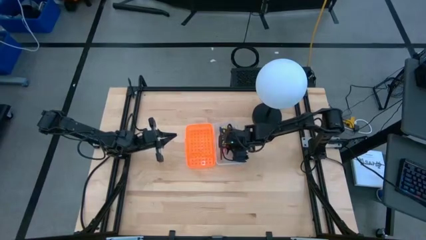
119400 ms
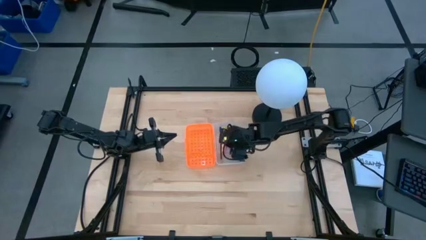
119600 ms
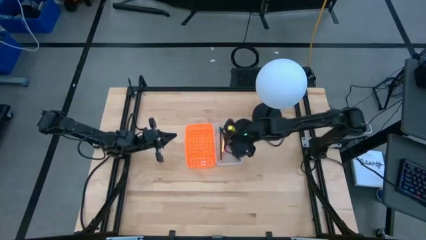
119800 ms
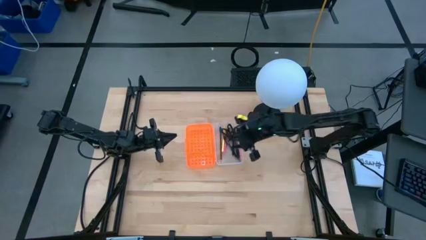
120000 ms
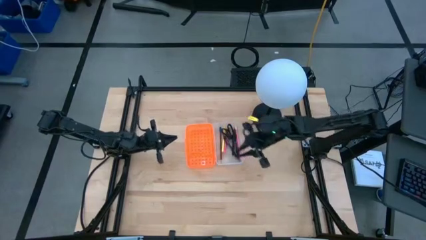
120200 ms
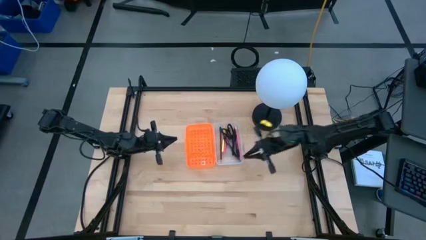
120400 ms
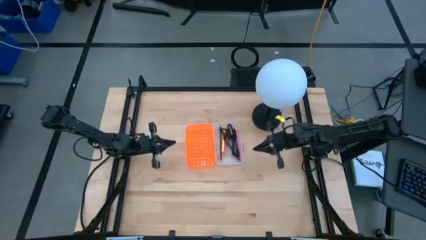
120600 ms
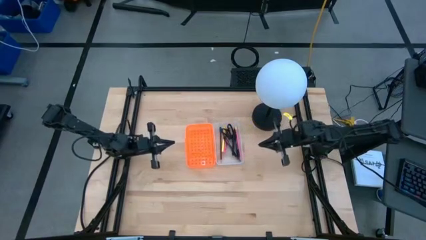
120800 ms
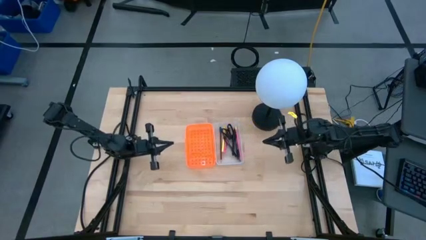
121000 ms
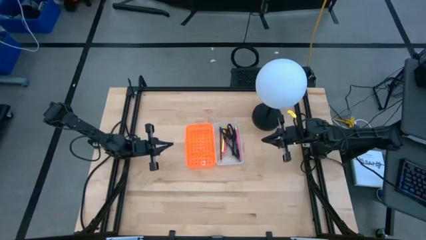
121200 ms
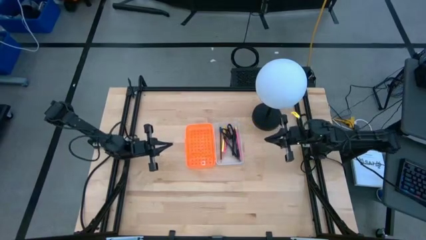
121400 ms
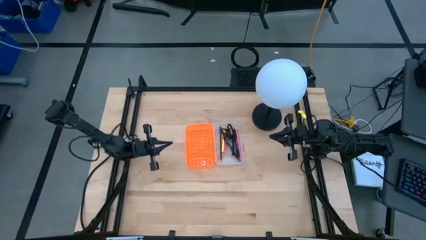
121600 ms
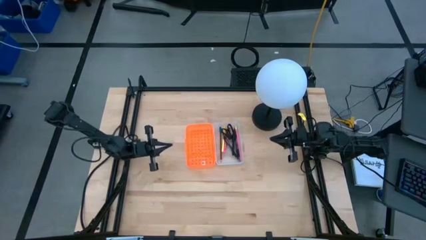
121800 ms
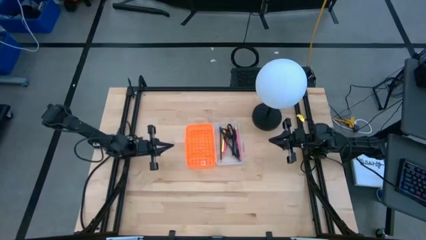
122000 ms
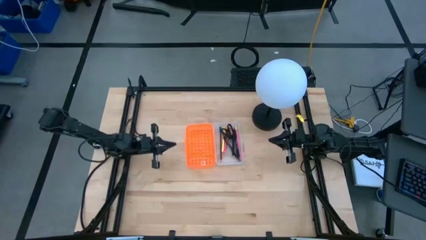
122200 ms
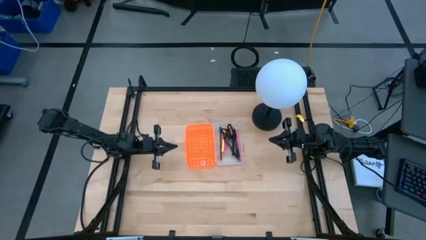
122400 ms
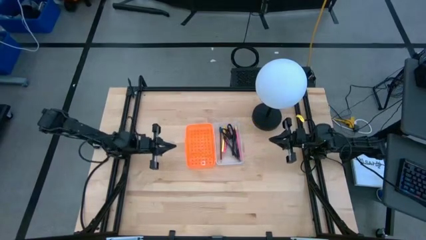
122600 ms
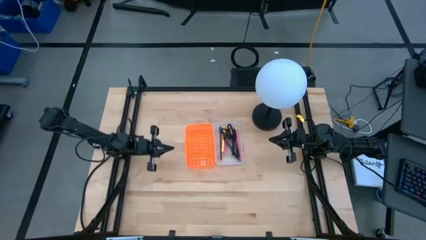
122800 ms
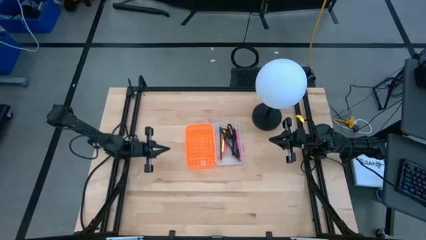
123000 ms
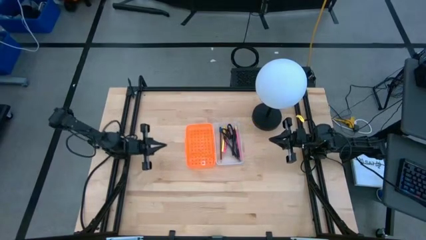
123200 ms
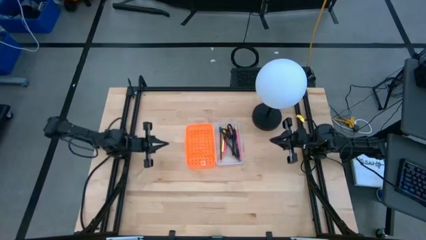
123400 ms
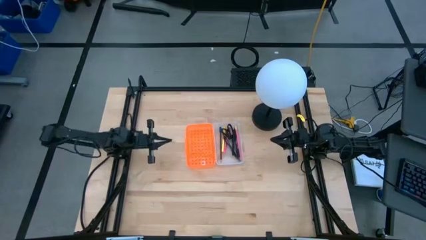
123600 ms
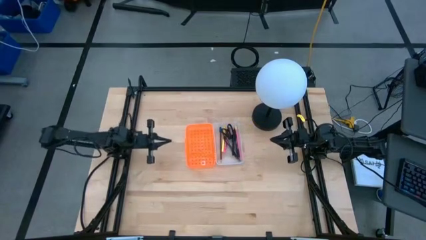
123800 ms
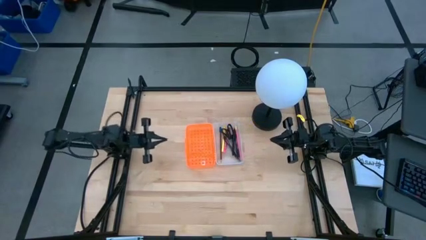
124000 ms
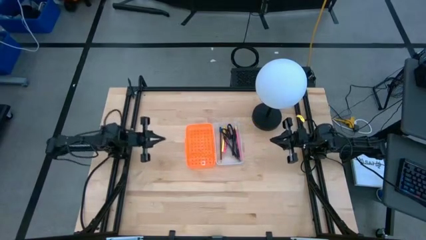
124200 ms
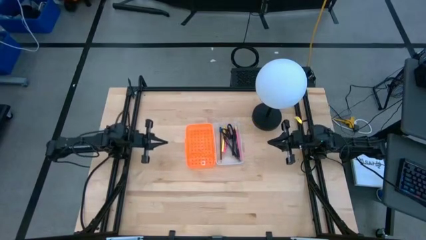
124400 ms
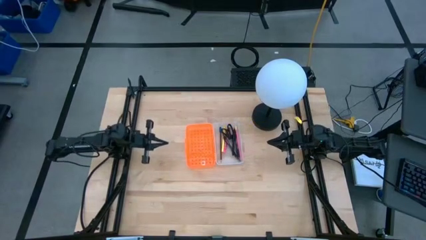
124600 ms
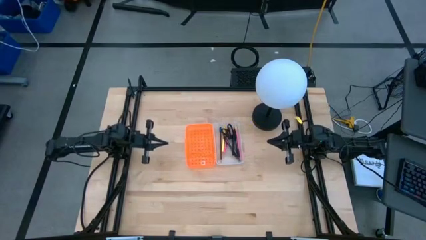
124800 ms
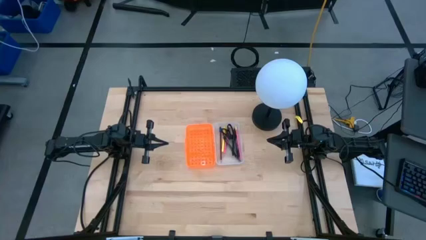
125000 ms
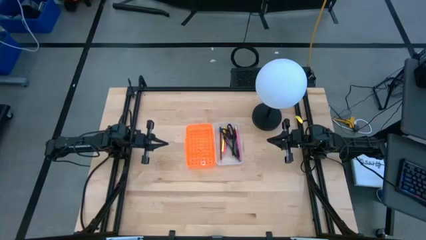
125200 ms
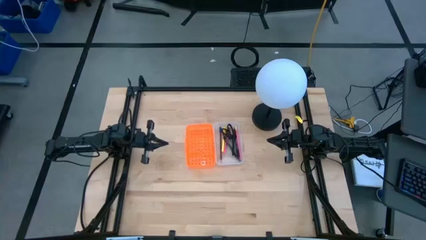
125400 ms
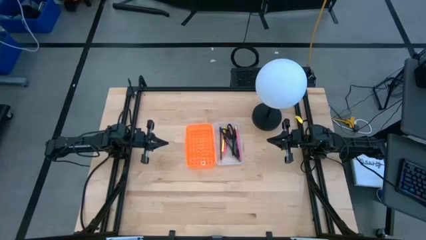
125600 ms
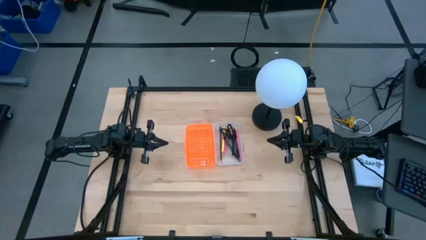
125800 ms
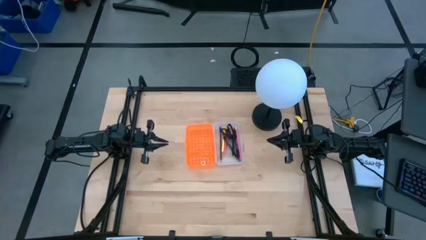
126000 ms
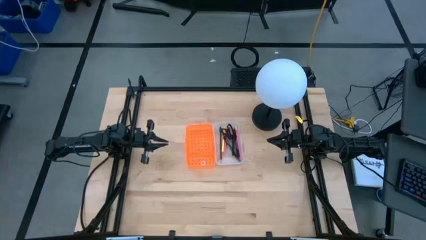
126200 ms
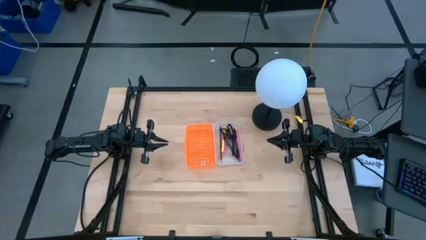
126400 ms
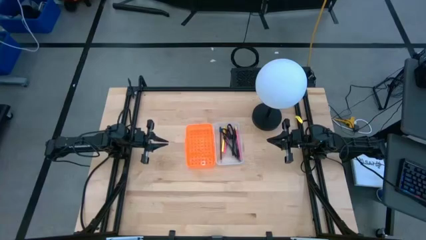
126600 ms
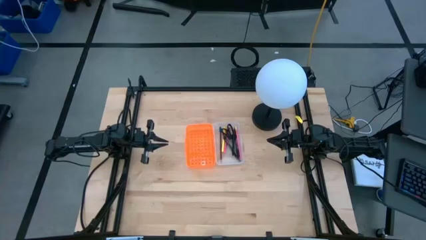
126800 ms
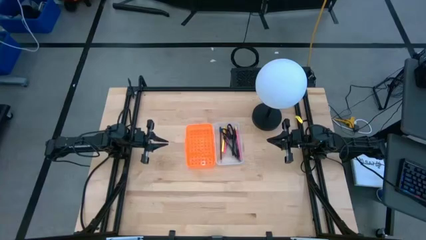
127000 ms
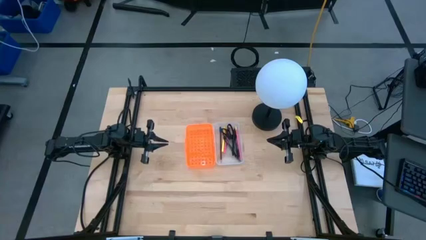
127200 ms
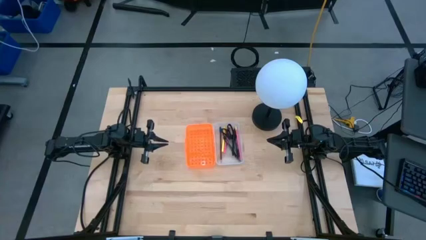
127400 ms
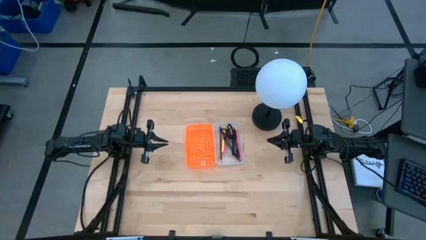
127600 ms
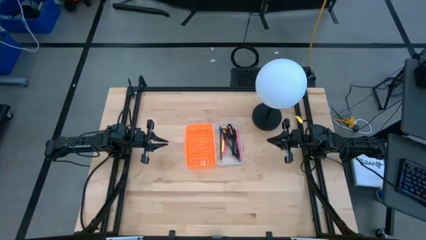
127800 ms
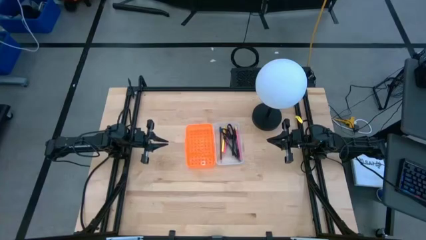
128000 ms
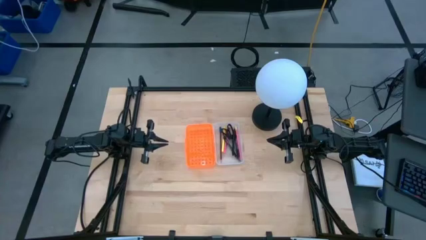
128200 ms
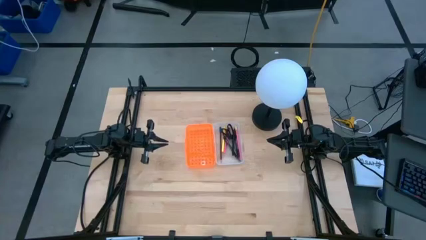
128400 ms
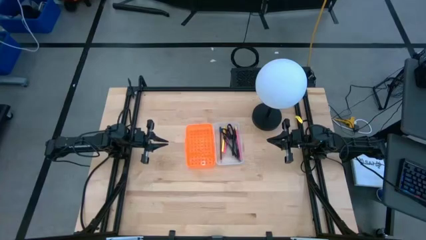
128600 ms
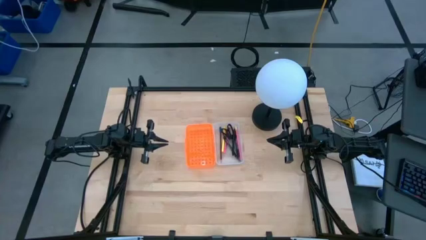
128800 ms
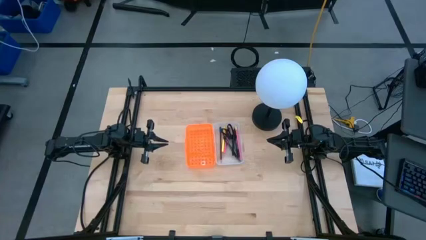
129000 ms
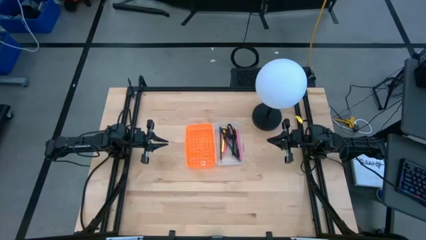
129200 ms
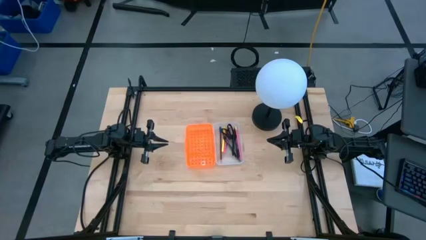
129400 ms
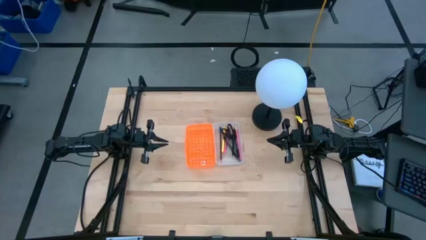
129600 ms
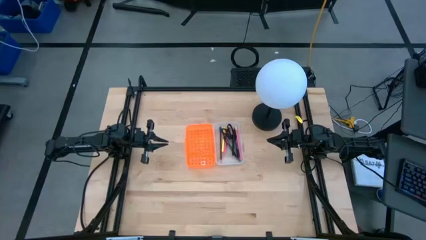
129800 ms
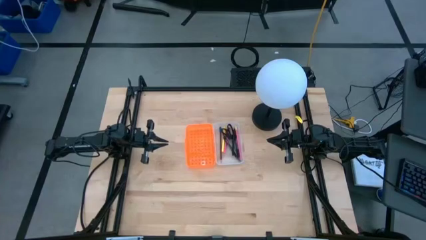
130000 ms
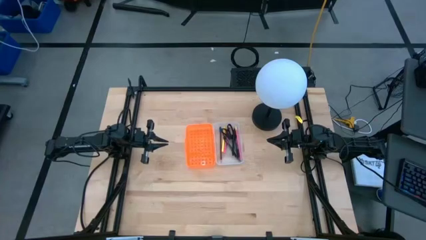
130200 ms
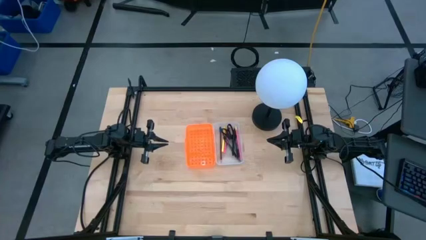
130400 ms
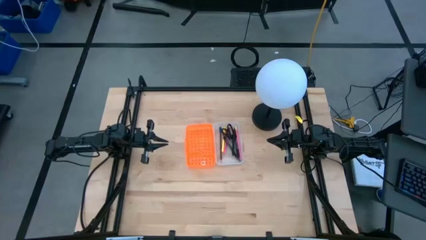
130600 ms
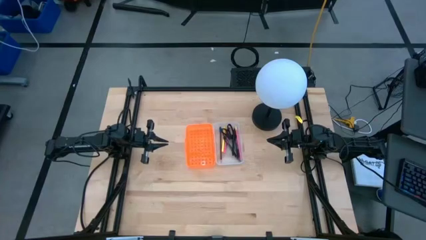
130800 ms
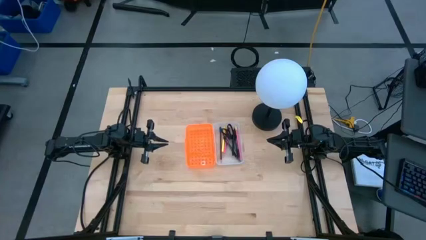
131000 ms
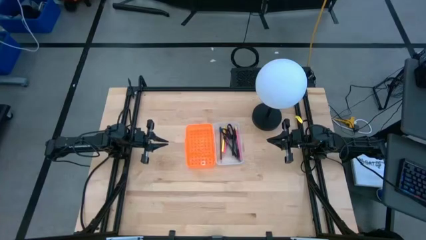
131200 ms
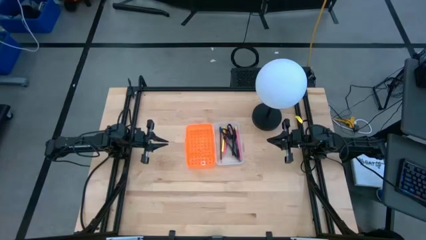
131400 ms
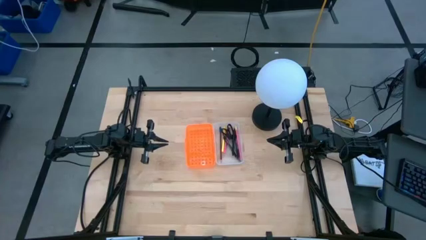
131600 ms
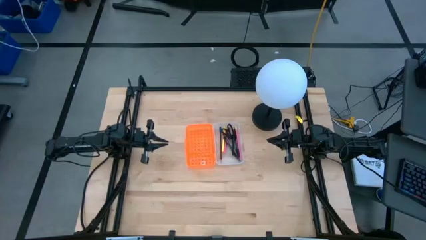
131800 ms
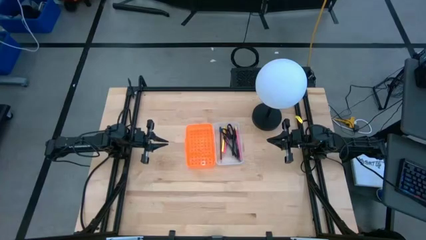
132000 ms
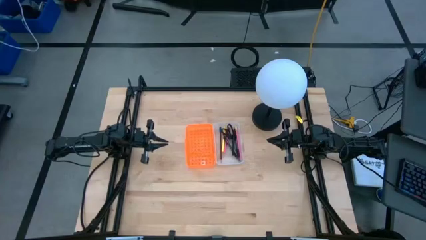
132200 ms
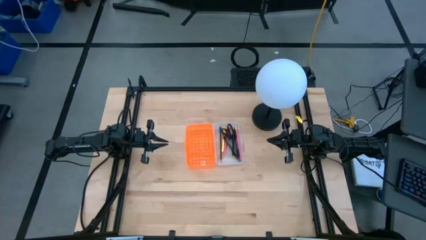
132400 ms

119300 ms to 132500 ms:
Task: Pick & place school supplies into a supply box
Return to Home Position

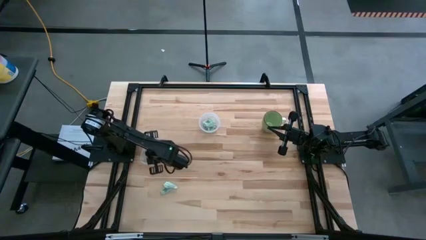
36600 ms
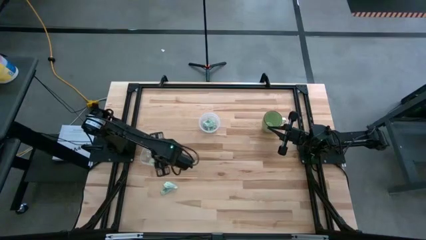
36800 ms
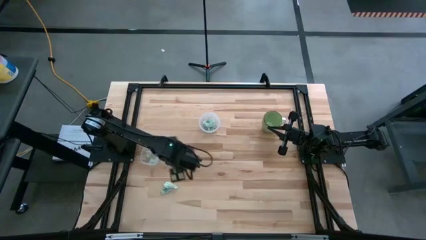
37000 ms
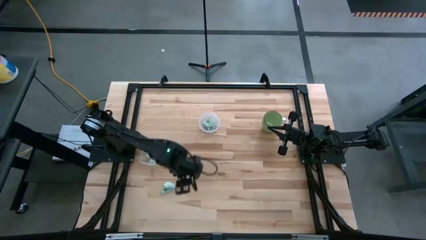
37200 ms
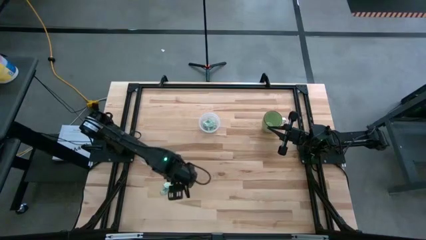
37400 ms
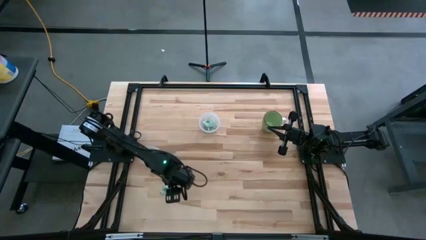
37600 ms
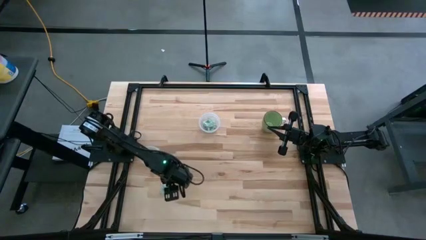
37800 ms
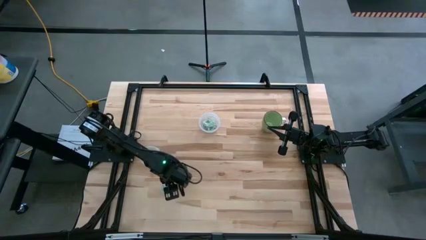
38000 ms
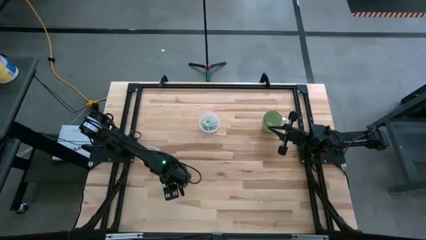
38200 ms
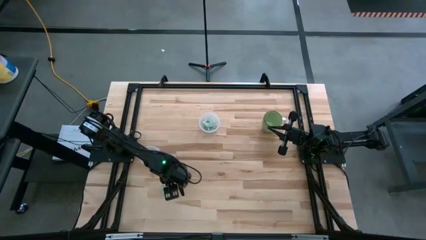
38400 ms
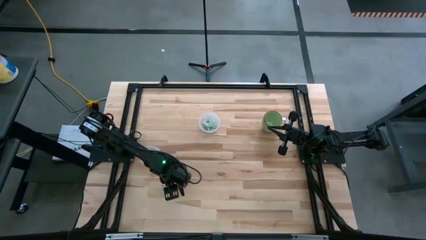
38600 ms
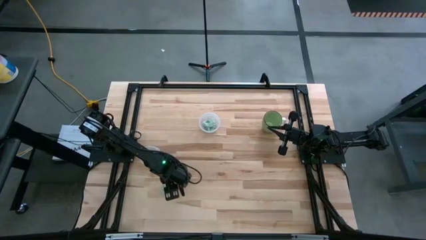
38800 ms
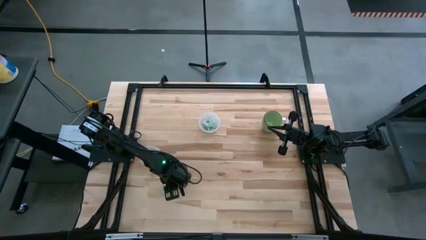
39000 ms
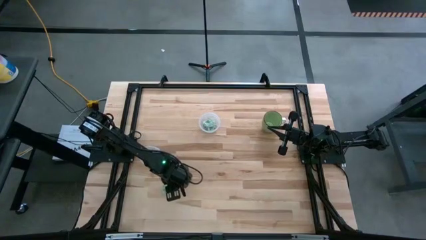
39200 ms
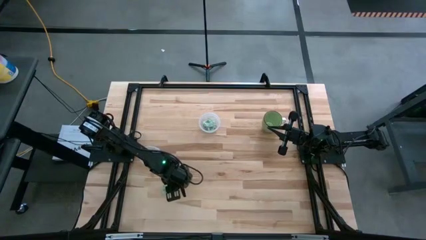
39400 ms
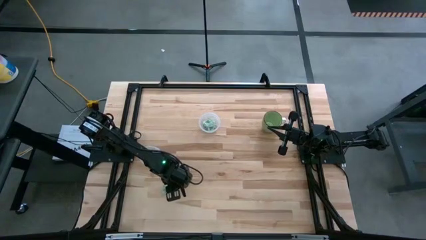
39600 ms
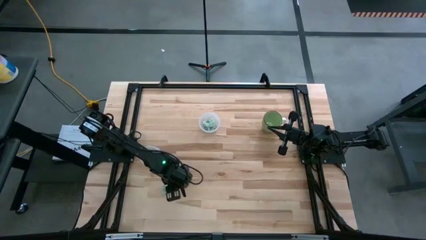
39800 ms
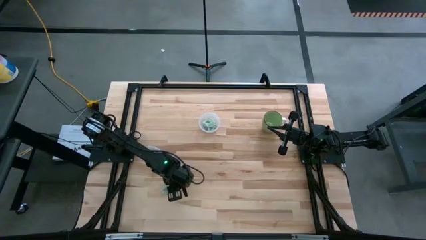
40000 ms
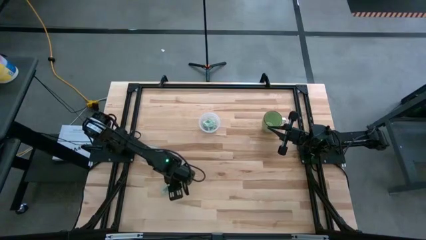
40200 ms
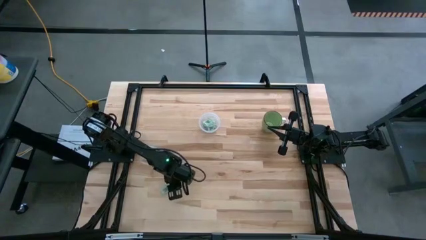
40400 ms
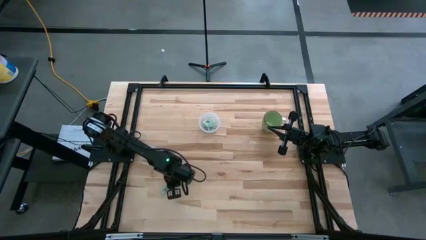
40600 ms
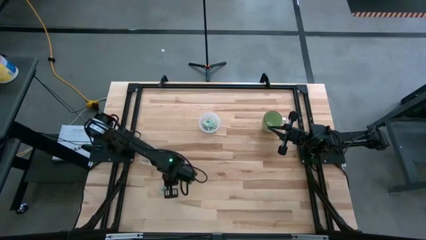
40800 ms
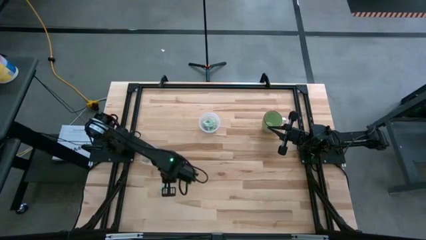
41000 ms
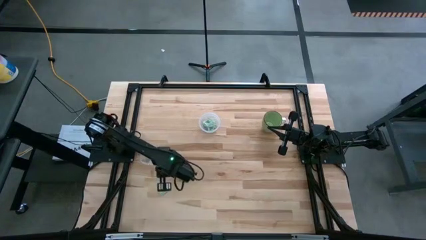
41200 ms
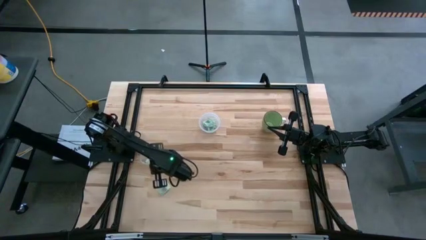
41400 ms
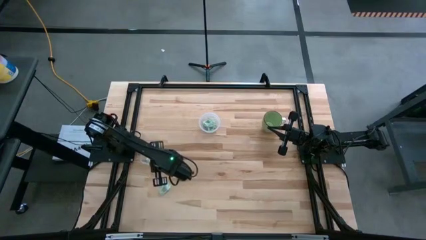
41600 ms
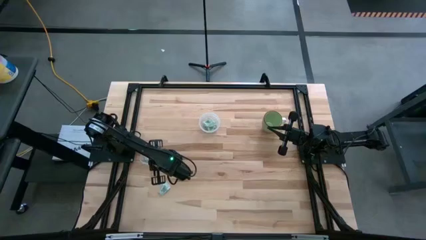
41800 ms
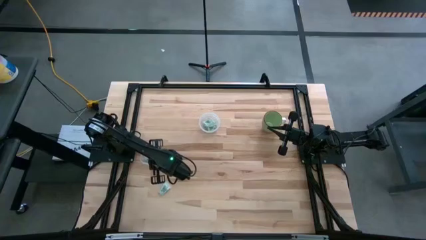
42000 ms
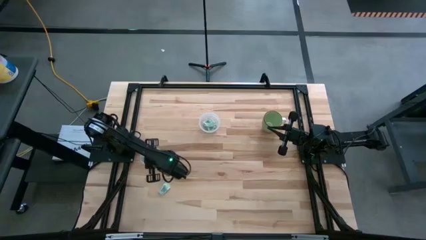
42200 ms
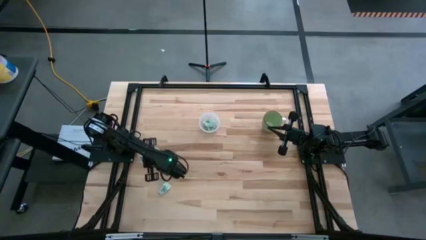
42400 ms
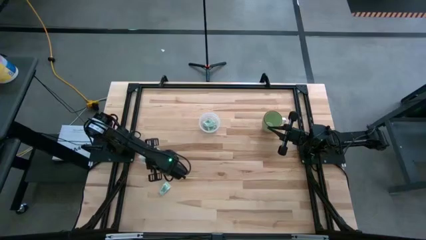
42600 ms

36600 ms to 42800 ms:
Task: Pick and place Stevia / Truvia into bins
Put the stevia packet into the left transparent container
